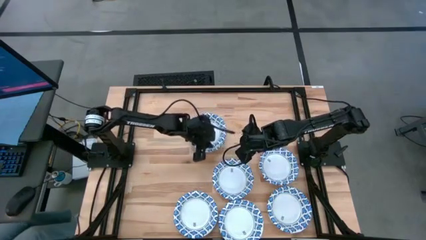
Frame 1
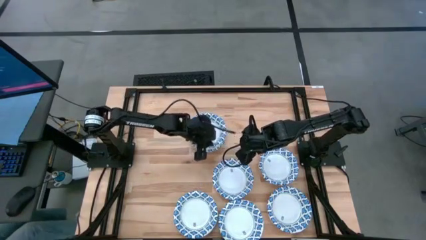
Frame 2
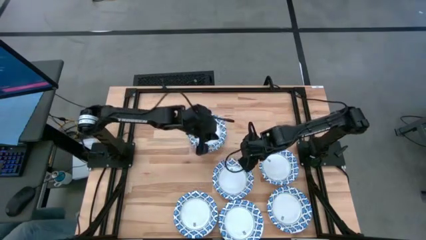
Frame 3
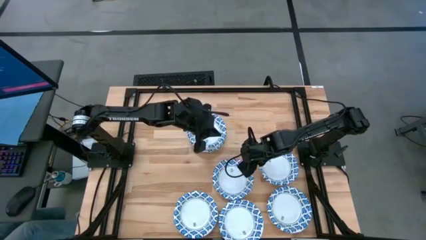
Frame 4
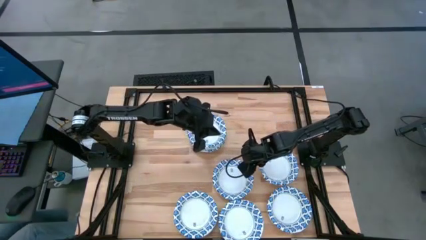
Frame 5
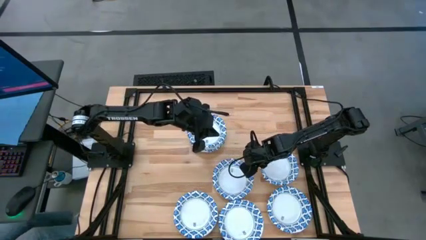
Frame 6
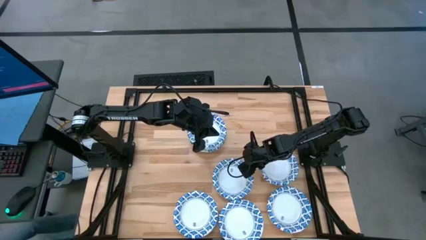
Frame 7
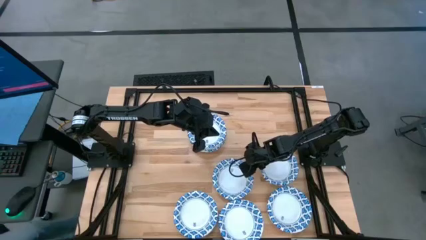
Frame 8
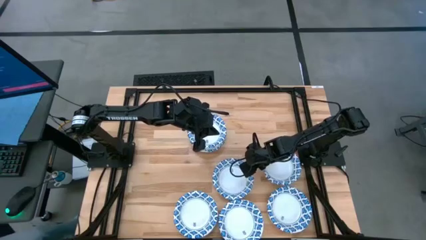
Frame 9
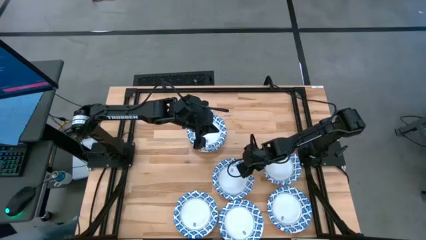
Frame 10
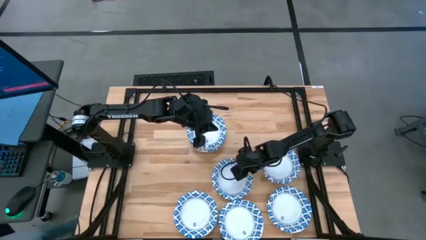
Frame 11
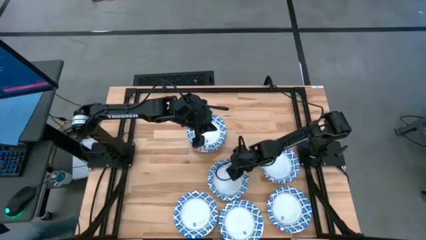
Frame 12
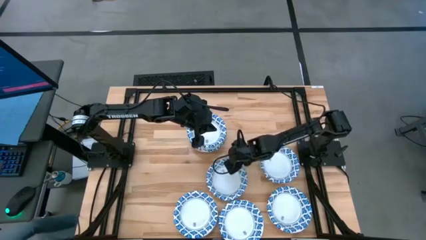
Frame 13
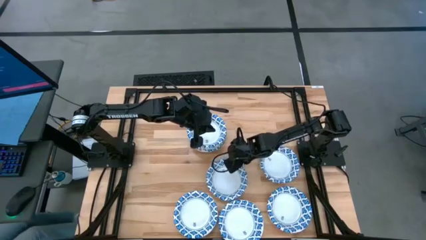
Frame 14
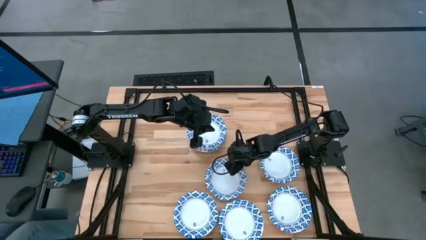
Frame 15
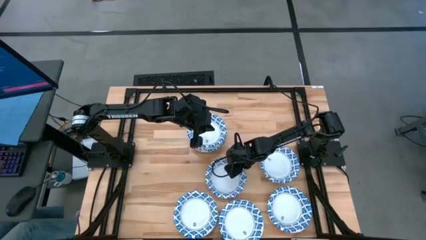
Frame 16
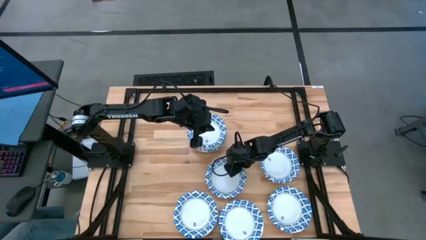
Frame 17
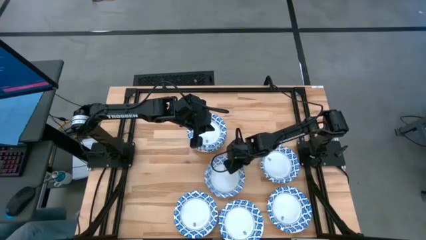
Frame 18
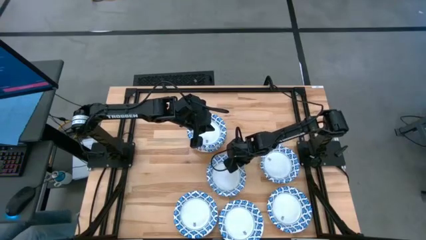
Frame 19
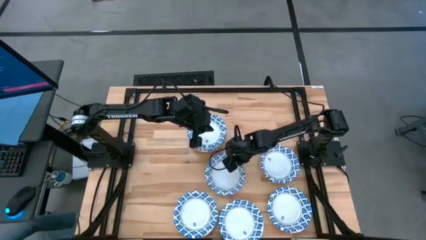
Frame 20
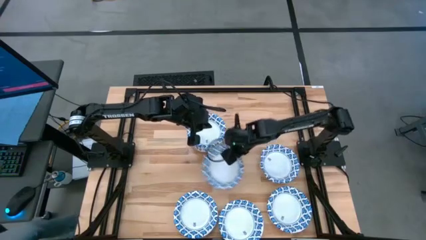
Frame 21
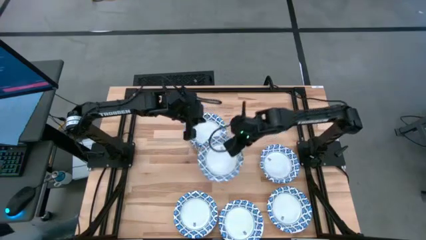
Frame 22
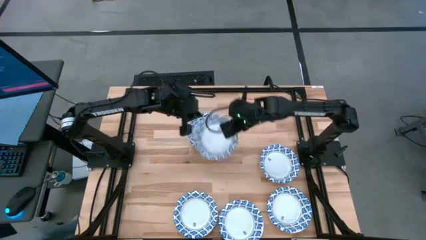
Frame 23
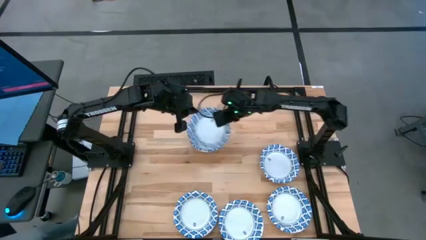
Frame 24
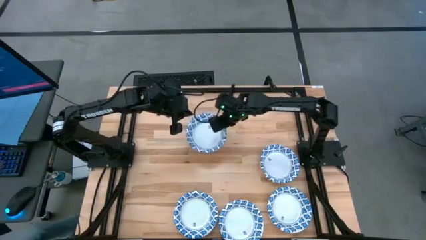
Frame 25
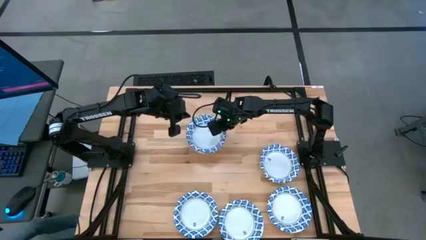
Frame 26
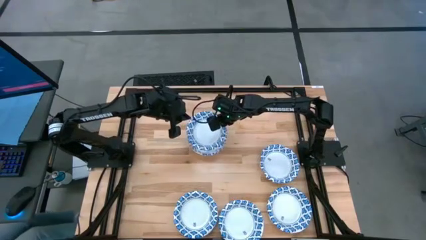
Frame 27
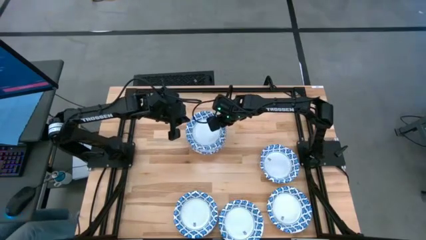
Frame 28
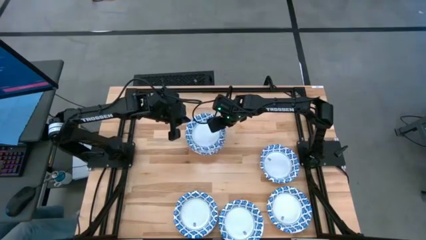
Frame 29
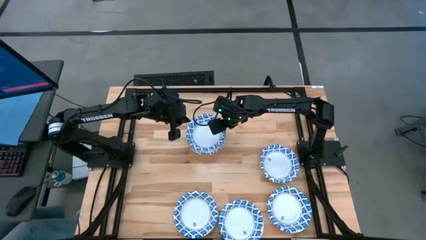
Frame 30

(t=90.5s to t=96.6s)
Task: Nest bowls inside each other
Stack the blue bowl on top of the blue bowls

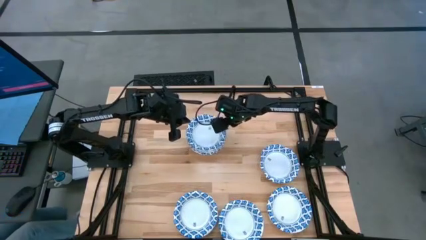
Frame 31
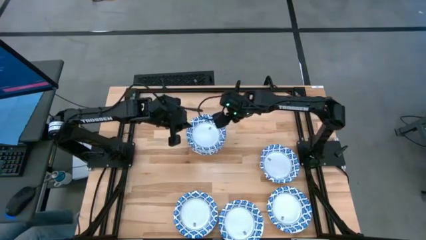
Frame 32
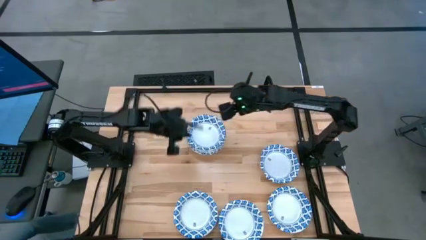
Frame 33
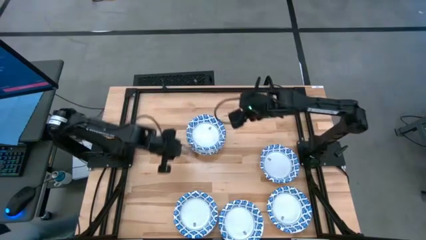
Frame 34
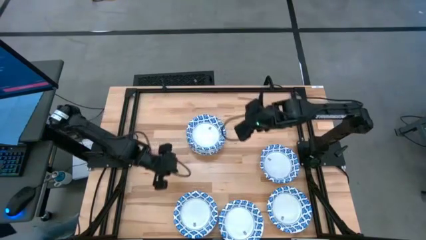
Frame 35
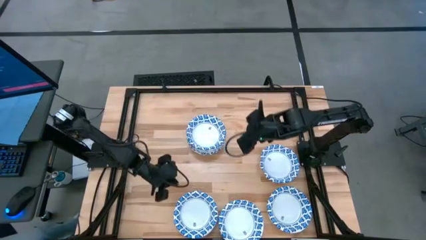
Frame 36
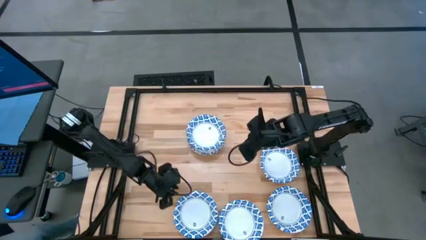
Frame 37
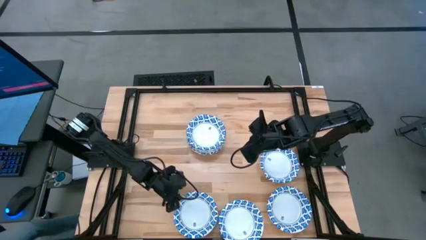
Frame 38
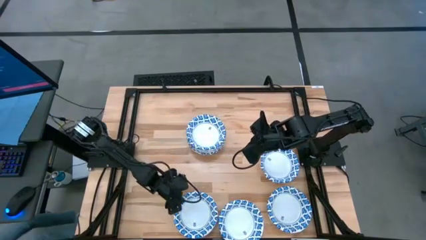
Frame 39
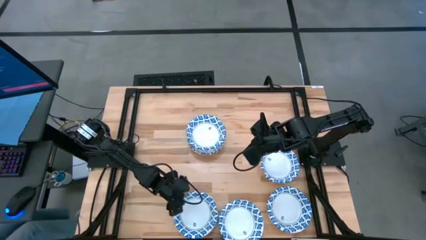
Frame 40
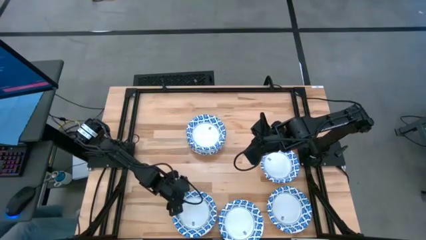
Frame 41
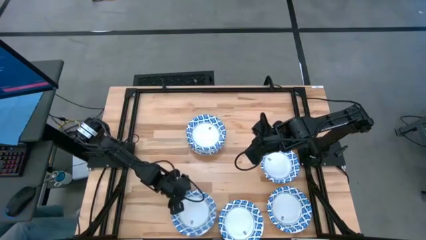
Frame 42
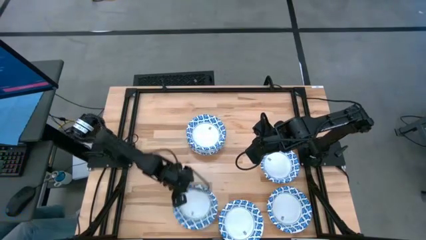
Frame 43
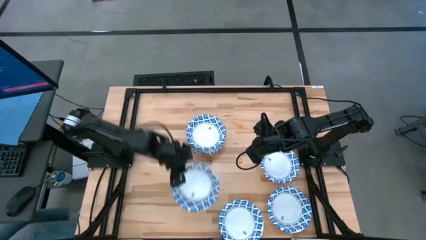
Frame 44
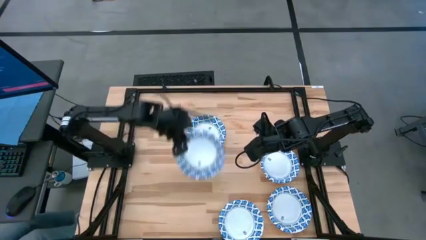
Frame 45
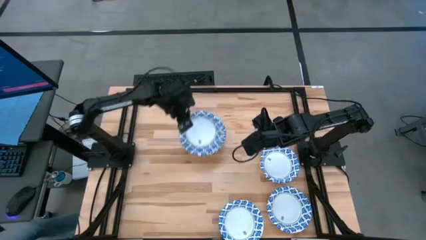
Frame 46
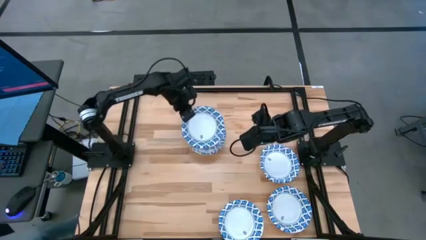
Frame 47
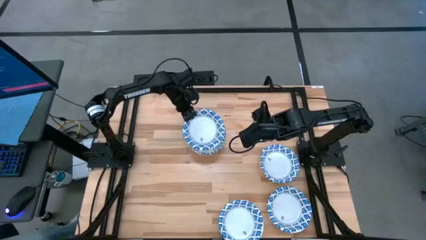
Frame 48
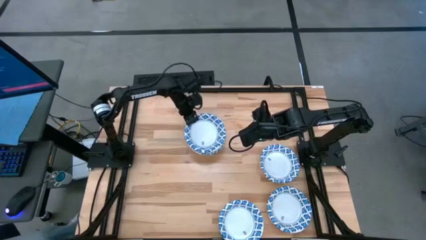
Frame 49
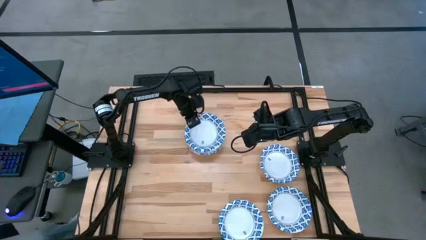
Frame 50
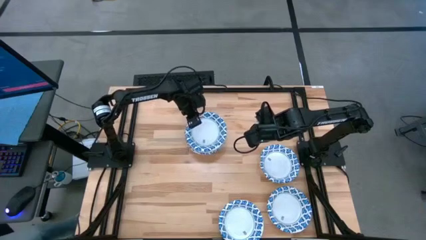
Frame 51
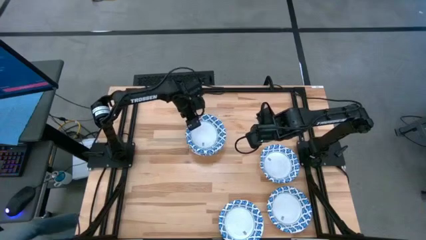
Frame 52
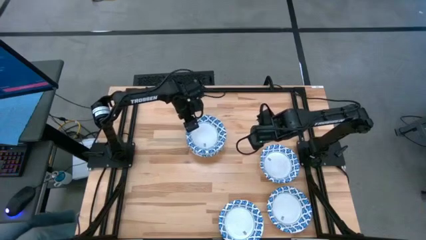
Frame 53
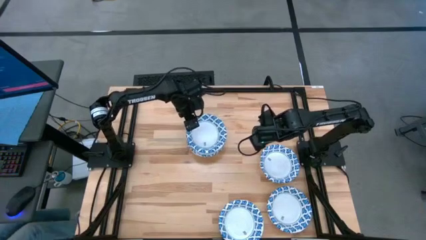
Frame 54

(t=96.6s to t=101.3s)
Stack the blue bowl on top of the blue bowls

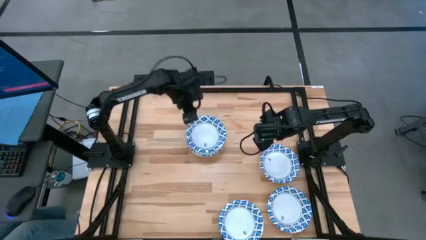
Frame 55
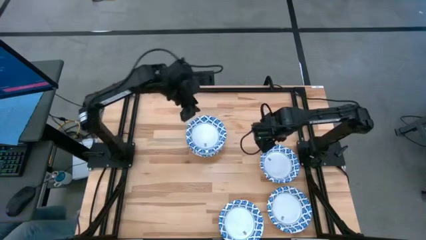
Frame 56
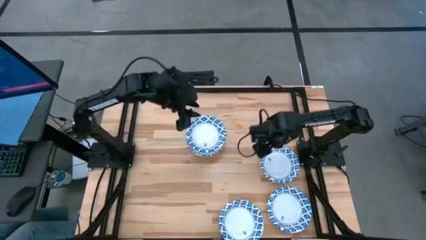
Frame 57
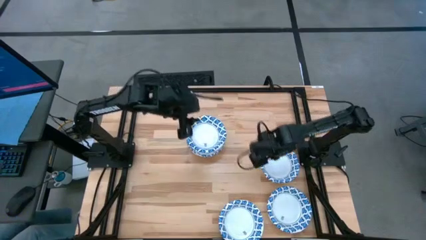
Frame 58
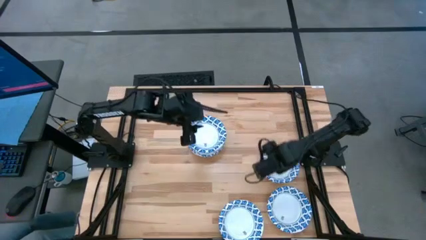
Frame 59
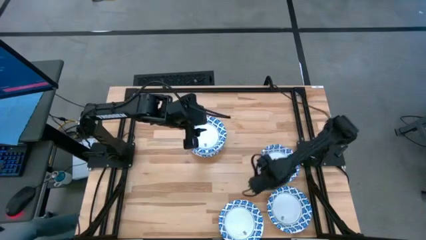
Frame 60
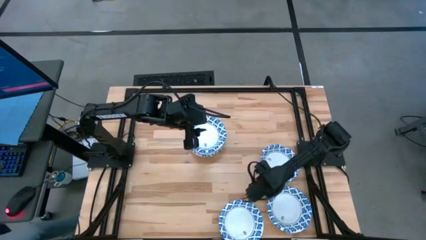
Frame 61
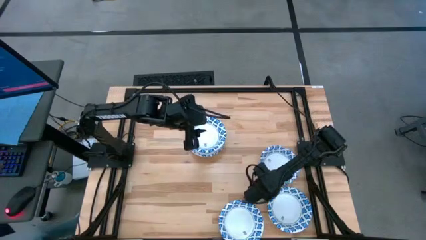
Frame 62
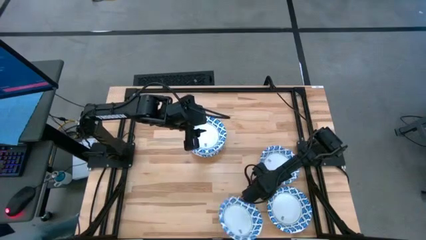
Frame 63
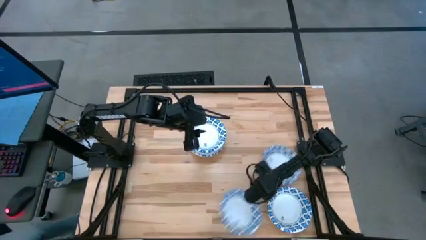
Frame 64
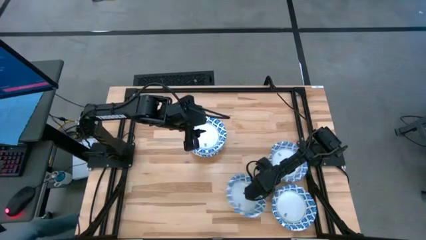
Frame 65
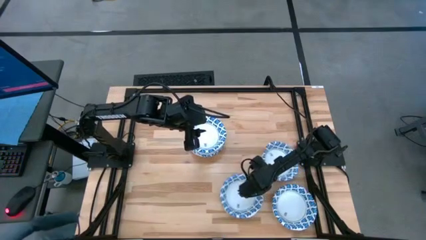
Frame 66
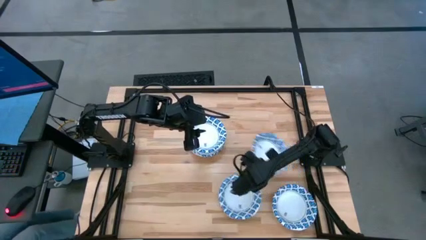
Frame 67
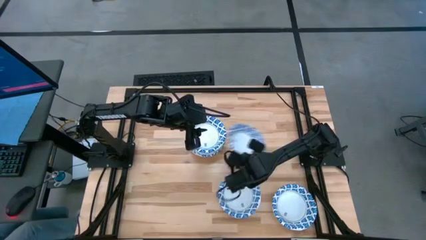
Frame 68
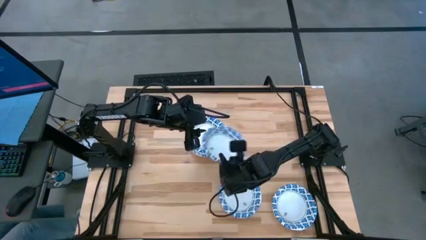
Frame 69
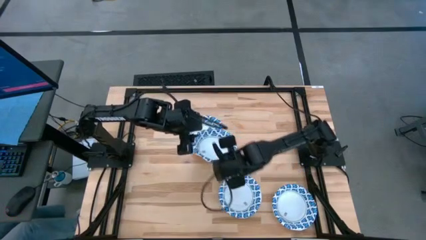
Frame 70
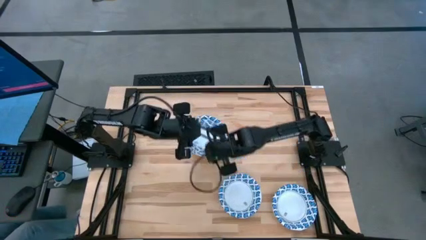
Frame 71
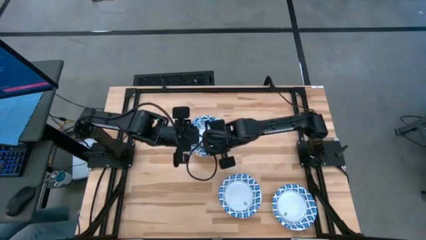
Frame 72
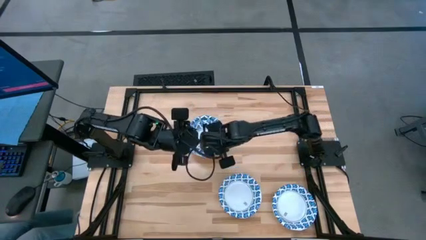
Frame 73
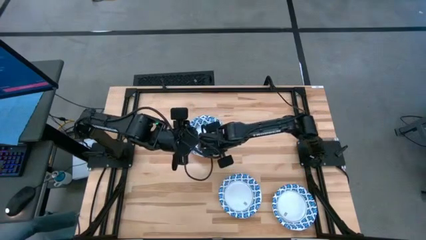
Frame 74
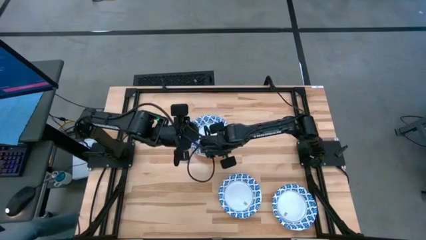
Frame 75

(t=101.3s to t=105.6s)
Stack the blue bowl on top of the blue bowls

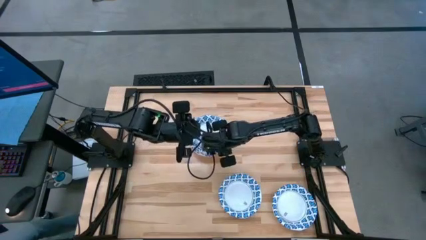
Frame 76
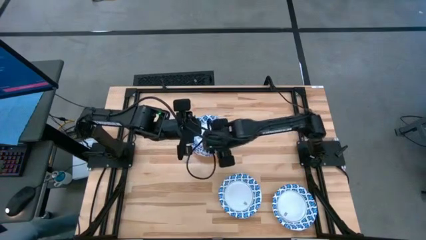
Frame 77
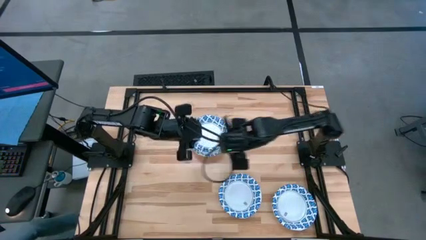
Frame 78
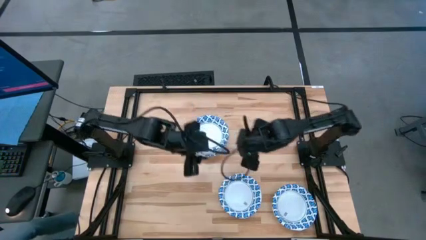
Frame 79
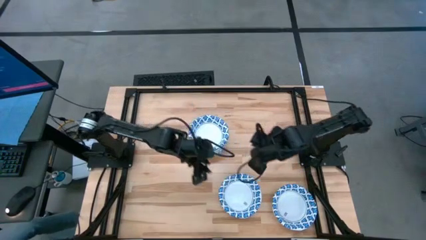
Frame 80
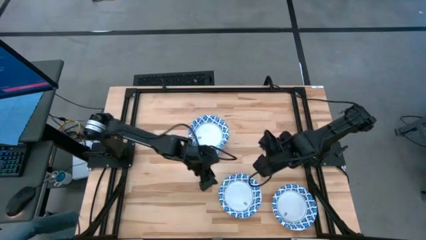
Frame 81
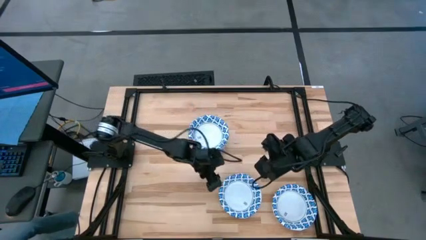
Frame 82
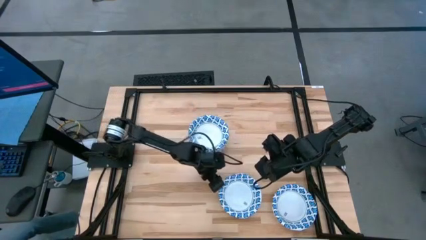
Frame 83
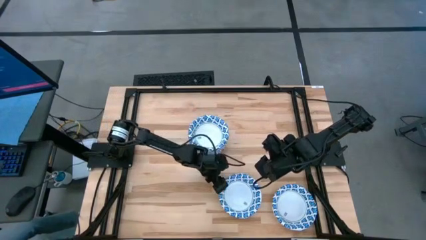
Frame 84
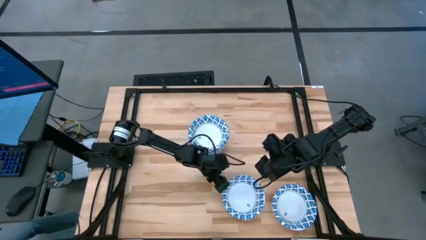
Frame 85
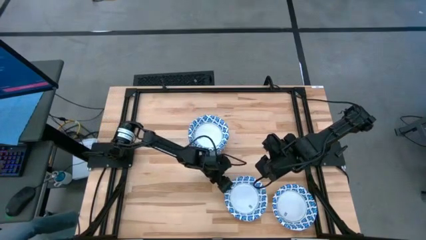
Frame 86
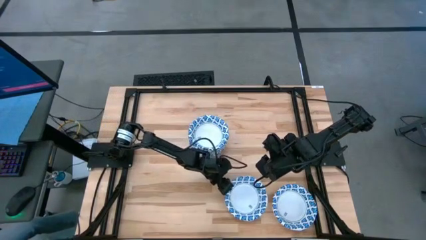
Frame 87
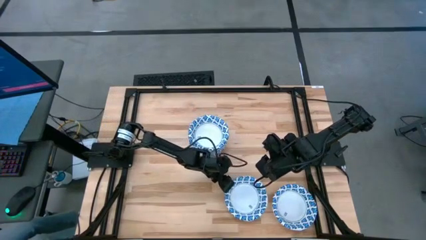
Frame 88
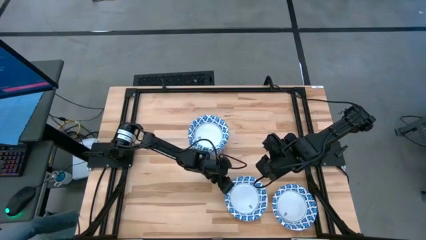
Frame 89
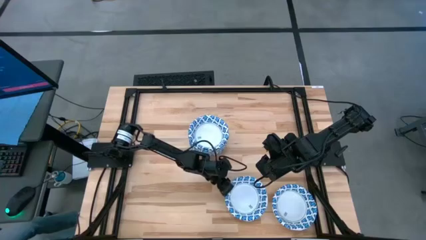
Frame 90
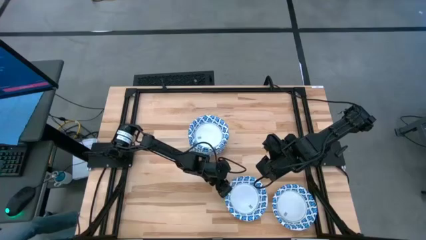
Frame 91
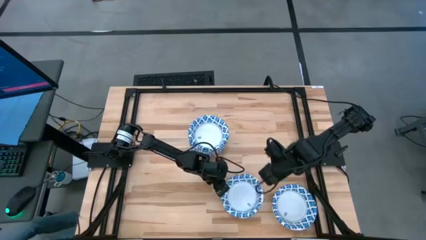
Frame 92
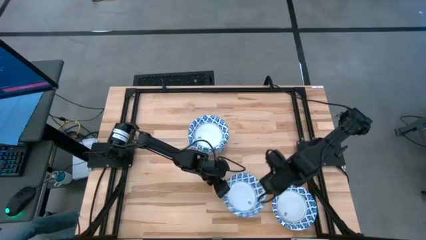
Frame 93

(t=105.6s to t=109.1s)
Stack the blue bowl on top of the blue bowls
